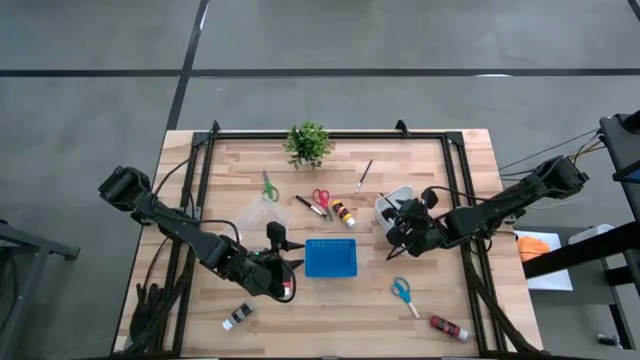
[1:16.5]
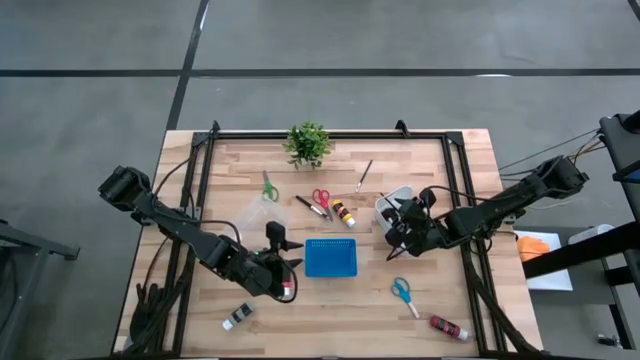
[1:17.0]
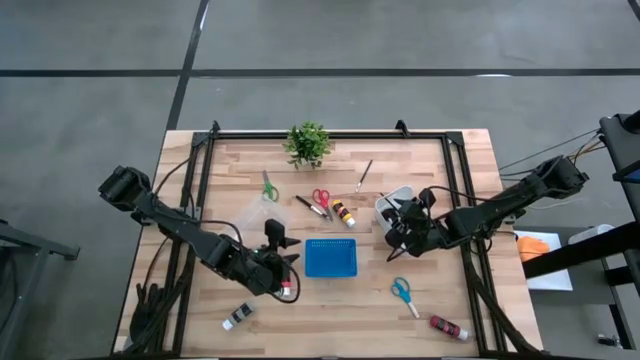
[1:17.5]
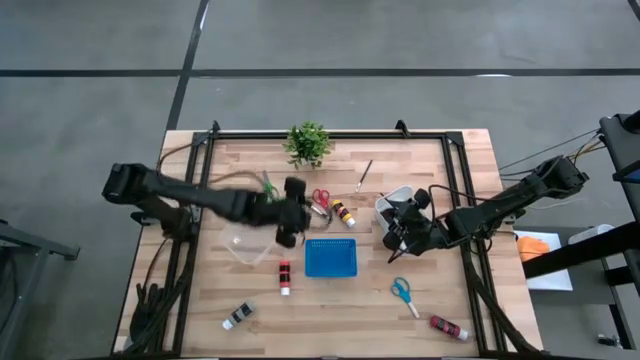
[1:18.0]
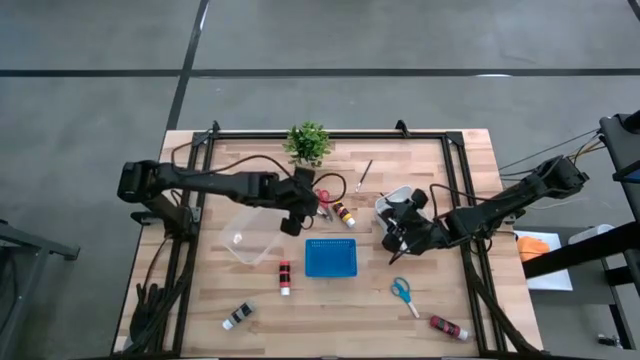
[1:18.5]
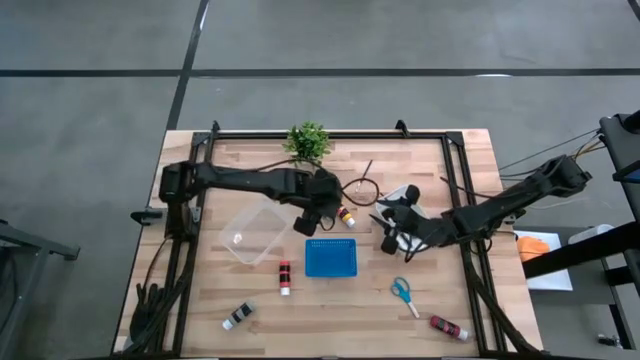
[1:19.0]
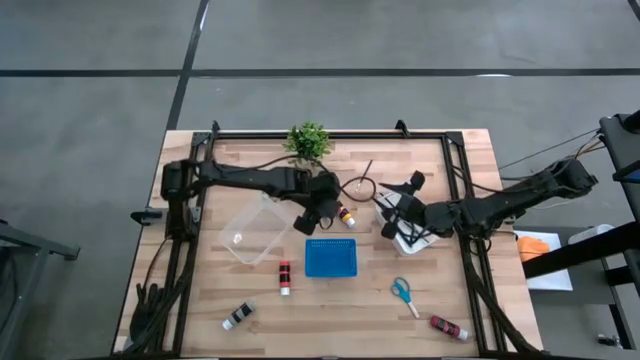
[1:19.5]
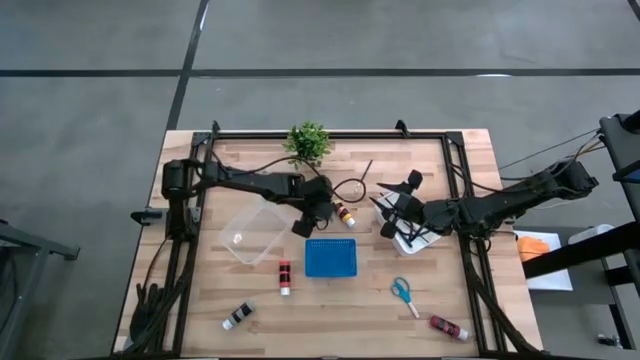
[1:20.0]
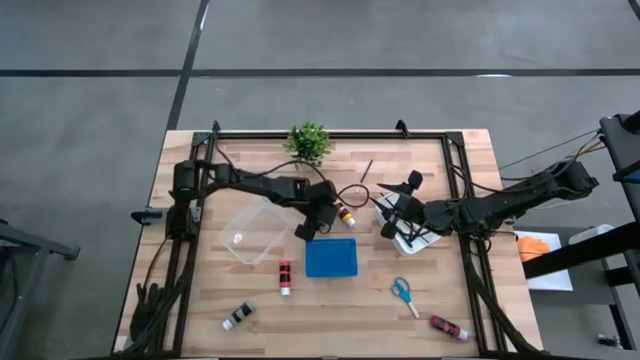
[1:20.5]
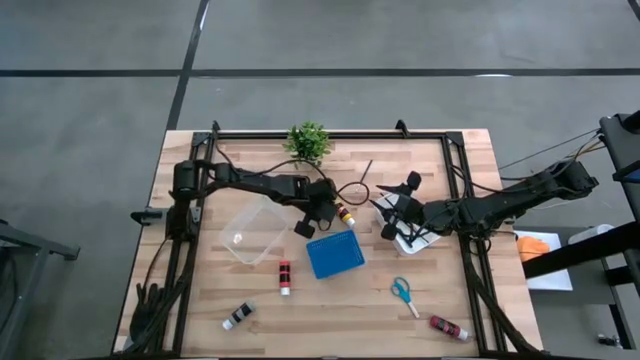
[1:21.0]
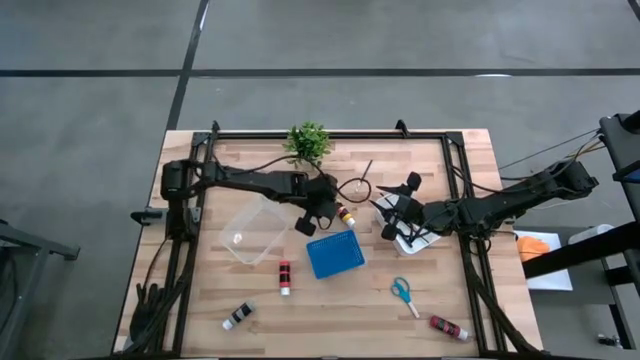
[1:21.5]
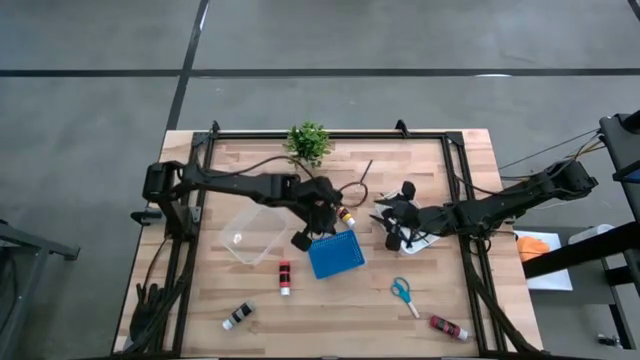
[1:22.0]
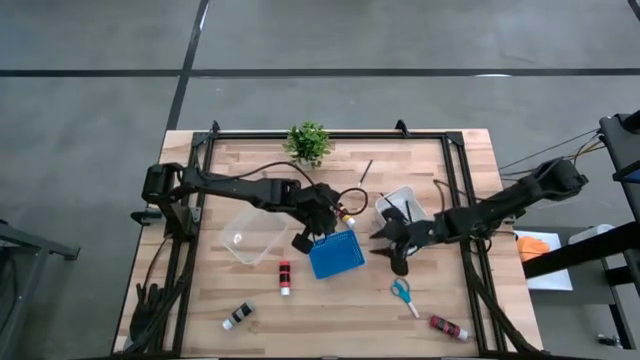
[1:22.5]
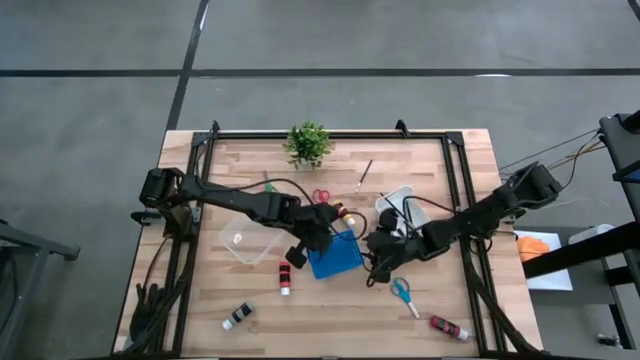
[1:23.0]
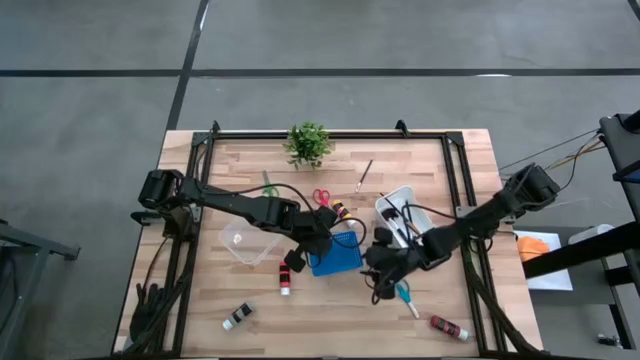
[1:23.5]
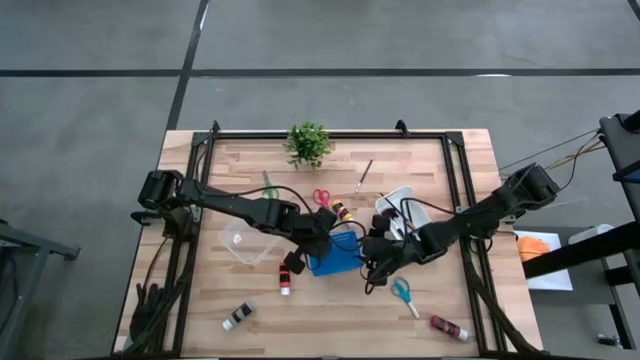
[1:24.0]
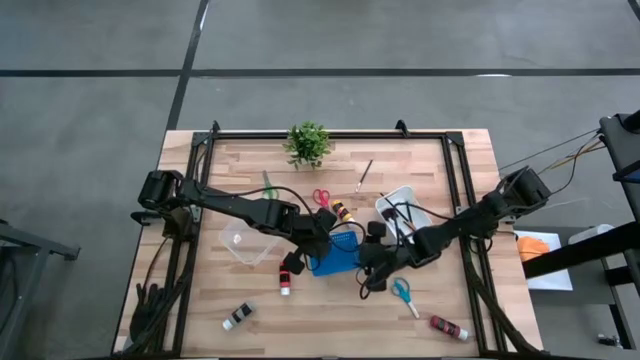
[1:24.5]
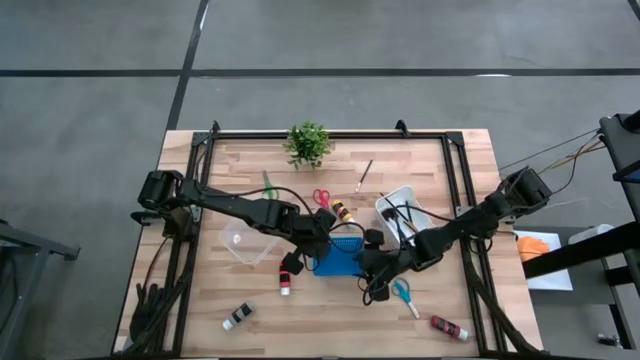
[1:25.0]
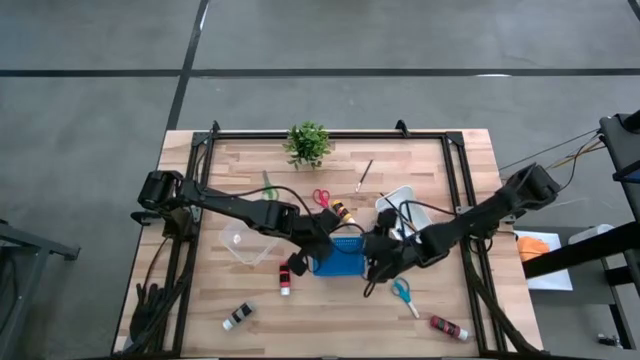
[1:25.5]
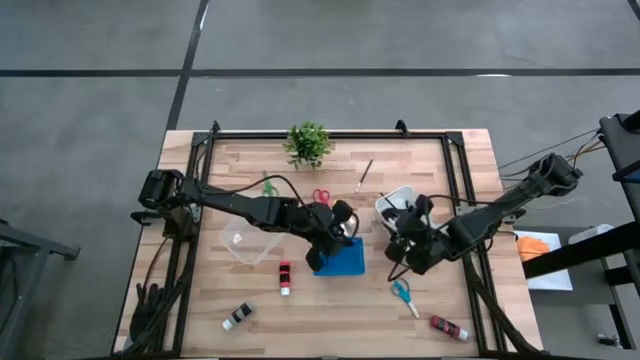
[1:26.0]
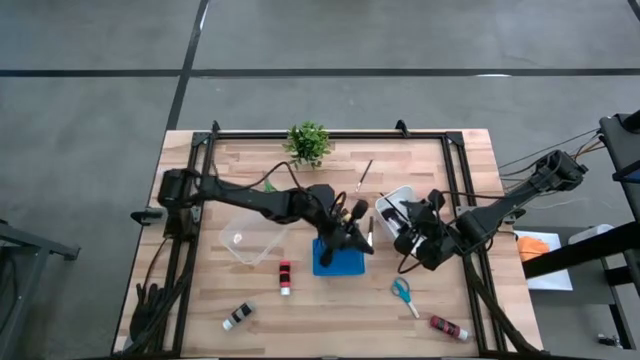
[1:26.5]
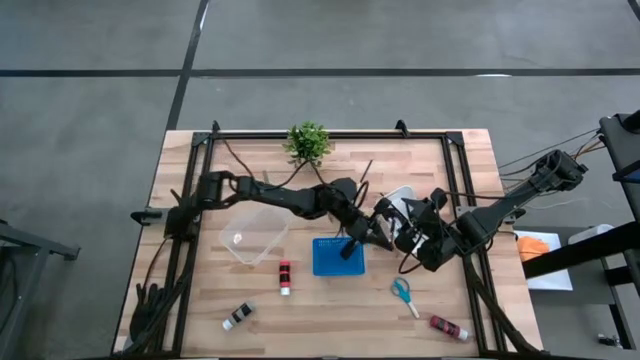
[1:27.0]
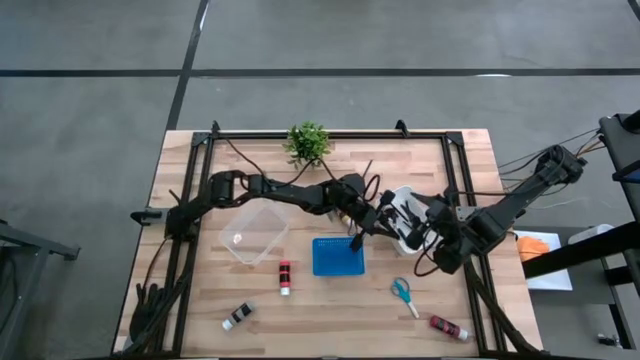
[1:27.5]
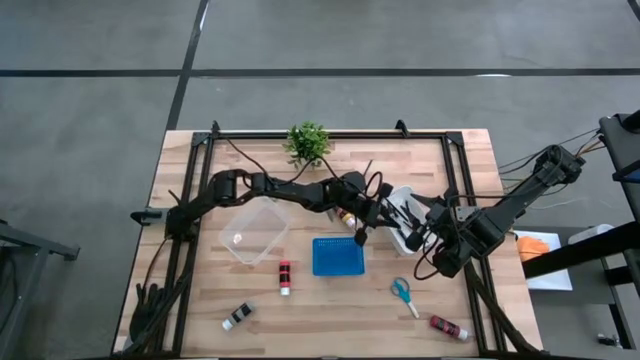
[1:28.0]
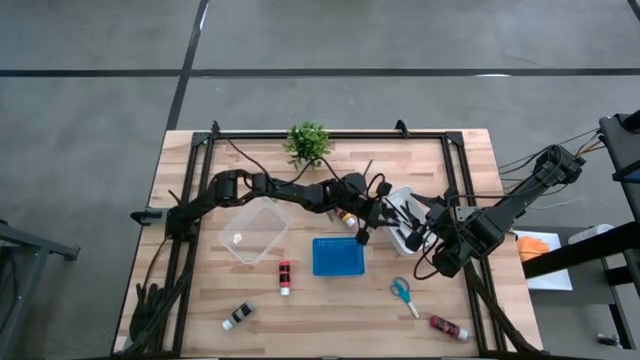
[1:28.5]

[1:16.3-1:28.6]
Task: Pick & Place Paint Supplies
Put the blush brush in the white bin

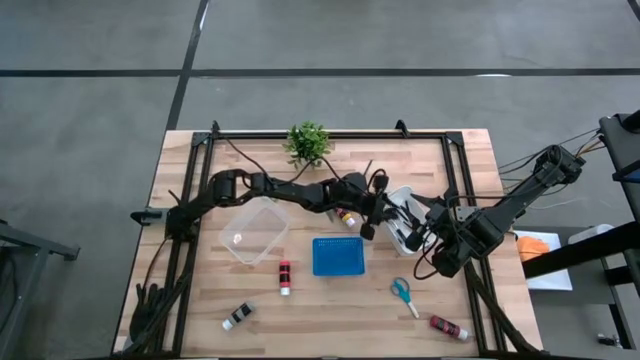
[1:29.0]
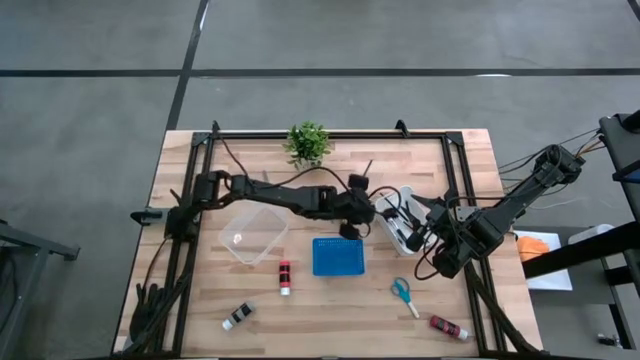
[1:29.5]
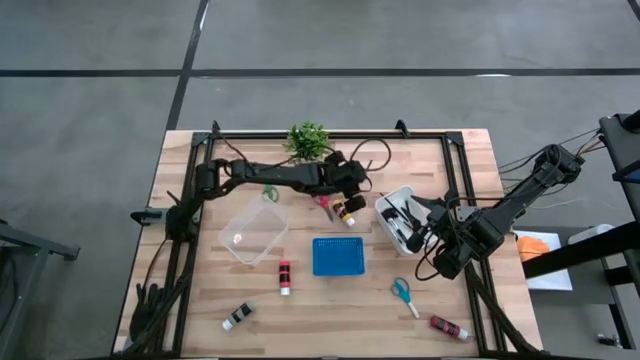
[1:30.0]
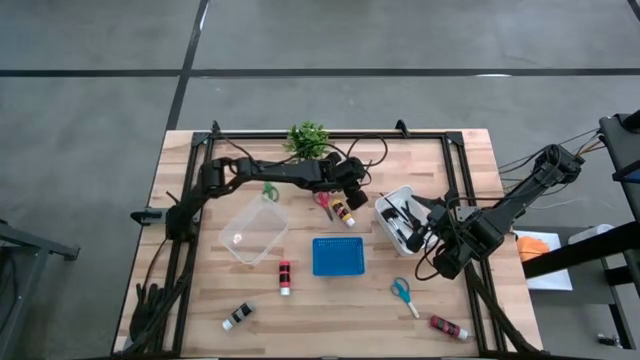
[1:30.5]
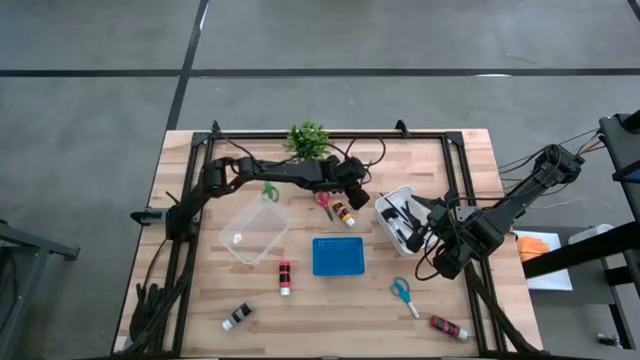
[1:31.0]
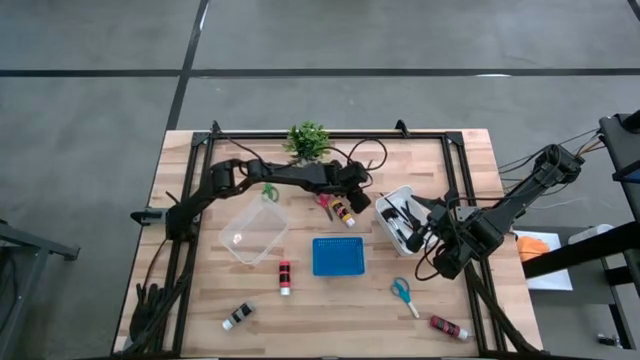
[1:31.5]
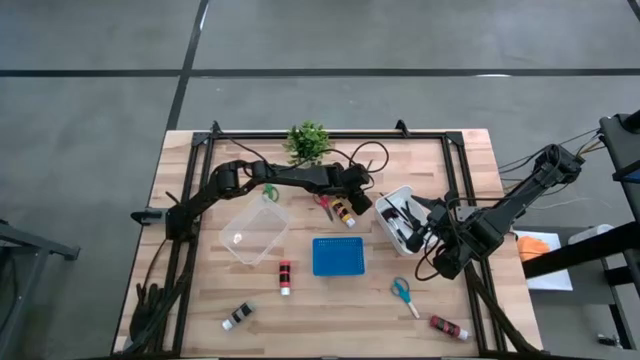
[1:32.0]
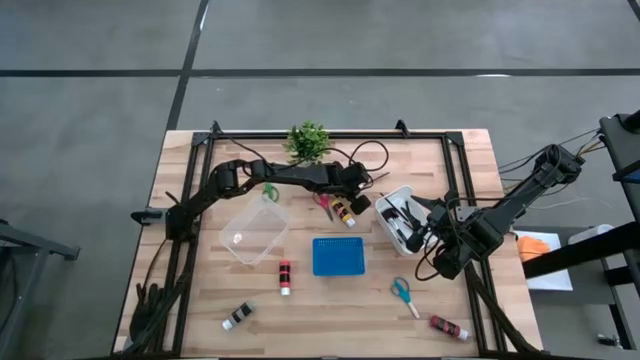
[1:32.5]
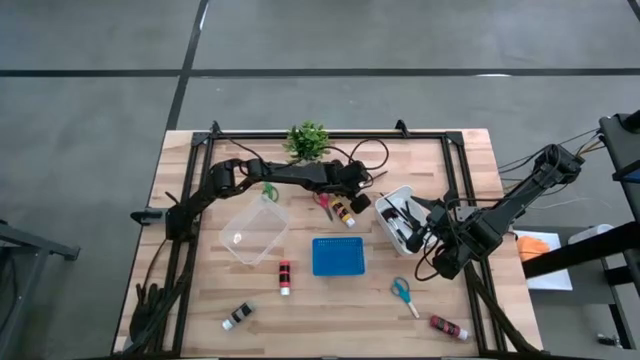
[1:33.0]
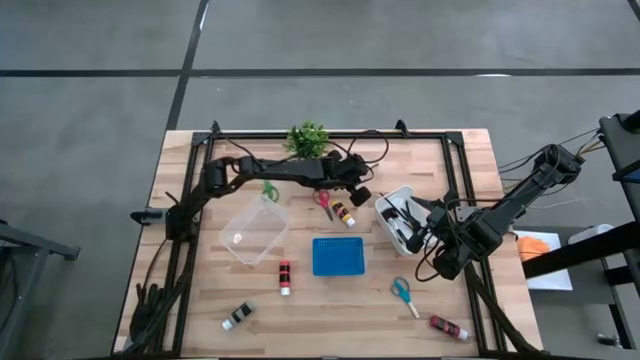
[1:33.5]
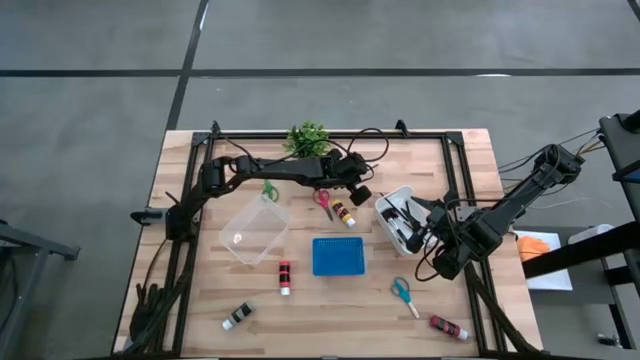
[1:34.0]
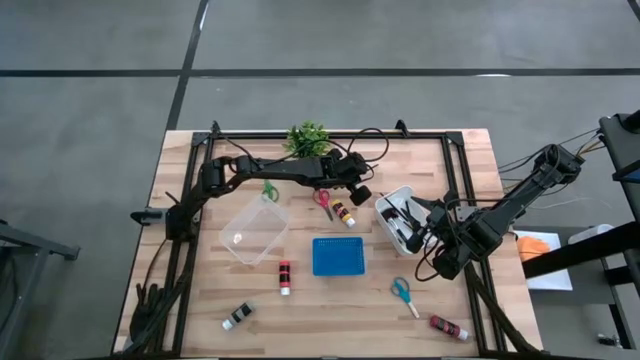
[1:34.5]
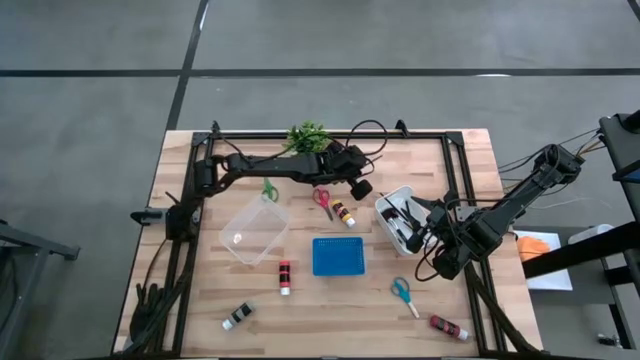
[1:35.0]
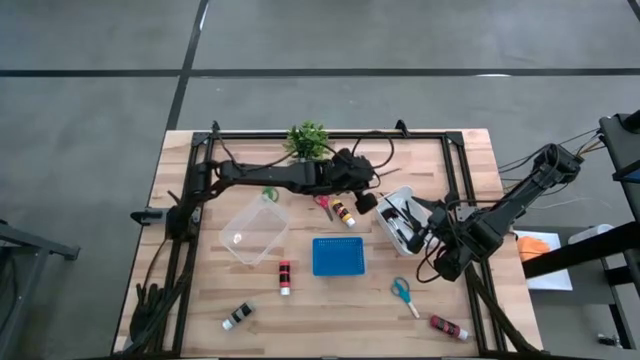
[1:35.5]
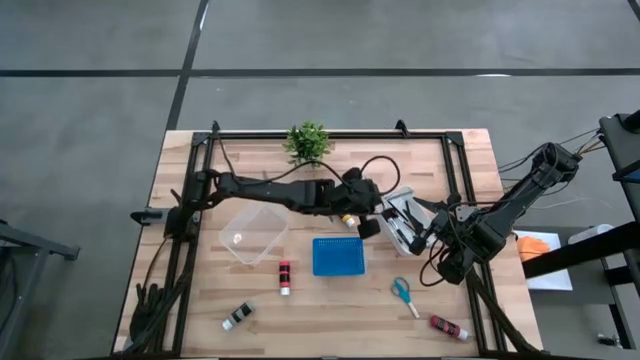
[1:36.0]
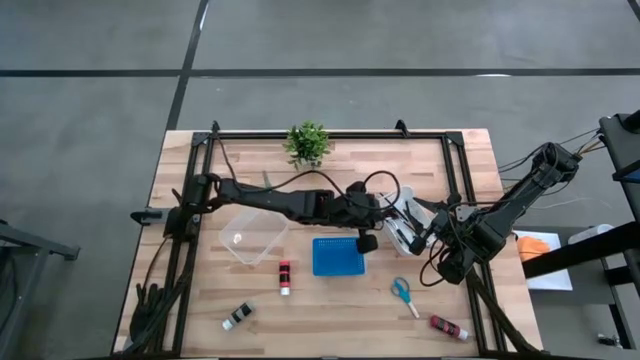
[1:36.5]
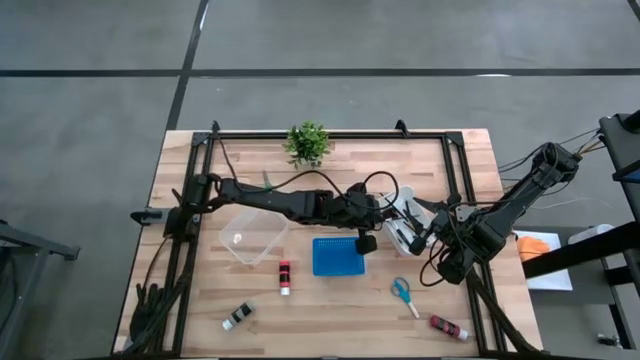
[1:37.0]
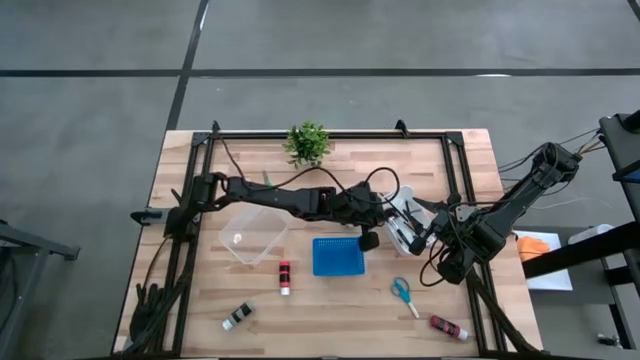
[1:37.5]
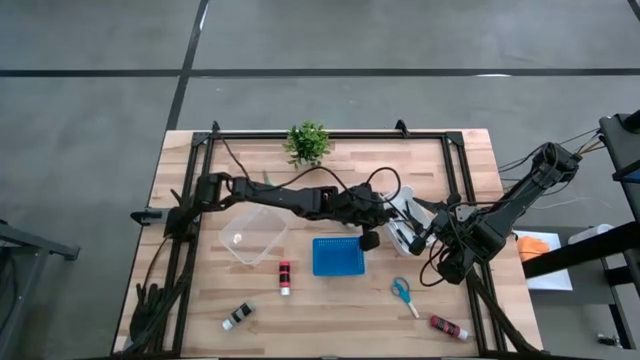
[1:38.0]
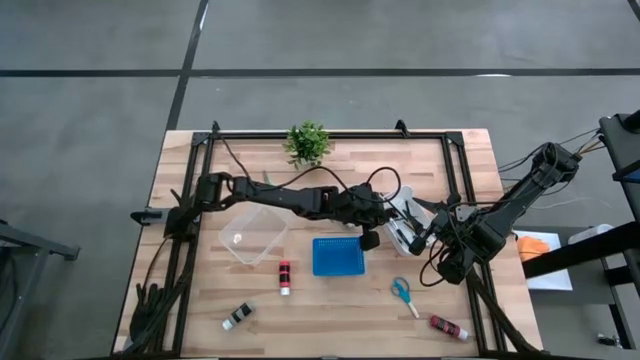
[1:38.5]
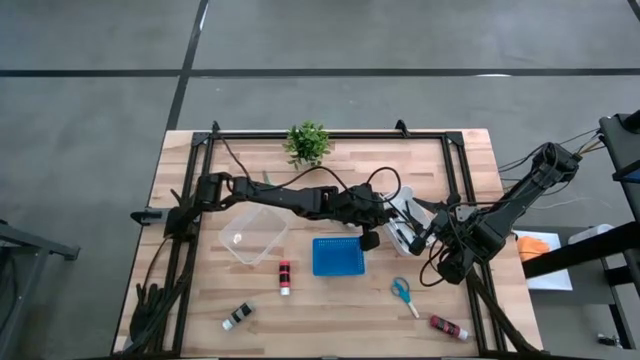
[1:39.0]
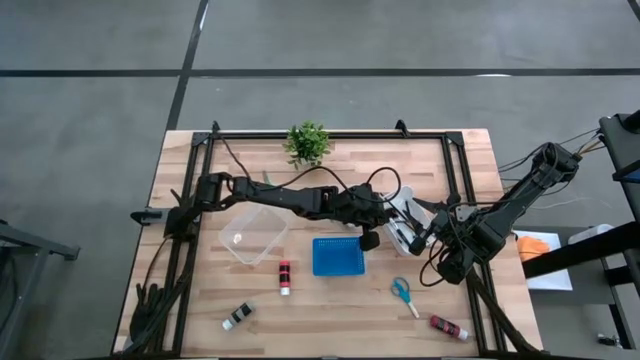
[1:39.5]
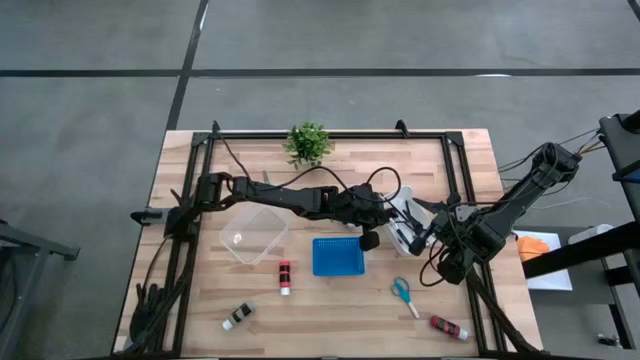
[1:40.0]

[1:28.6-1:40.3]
Put the eyeshadow brush in the white bin
